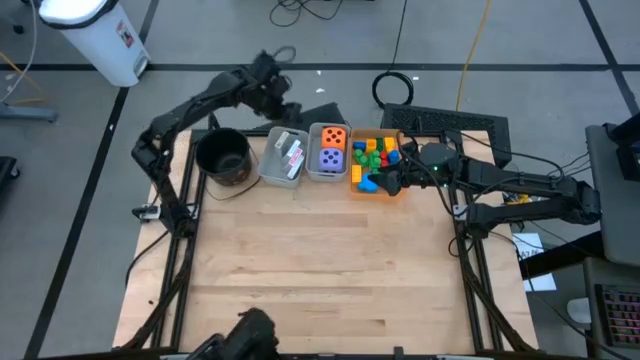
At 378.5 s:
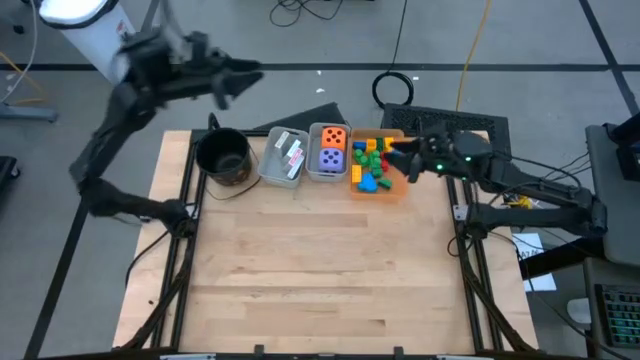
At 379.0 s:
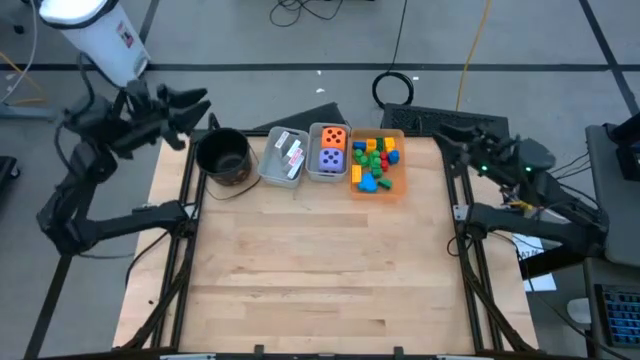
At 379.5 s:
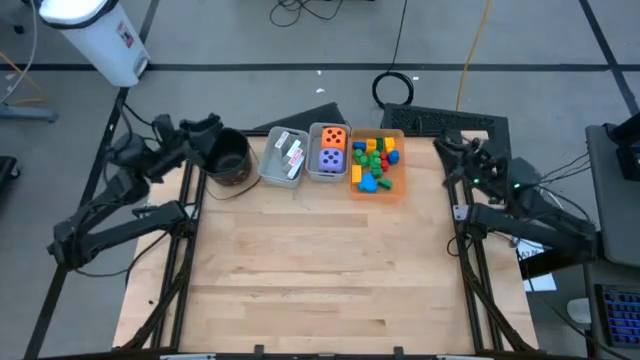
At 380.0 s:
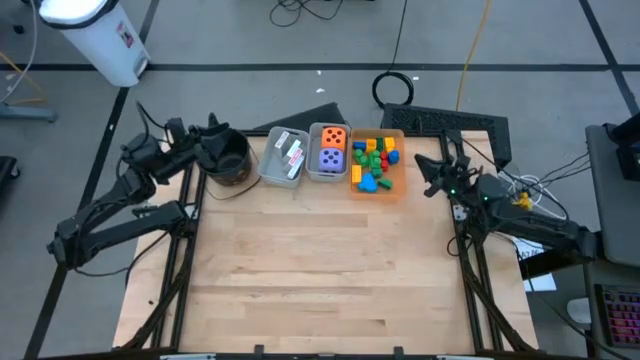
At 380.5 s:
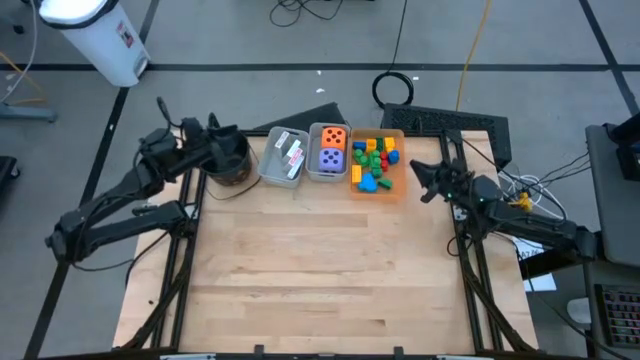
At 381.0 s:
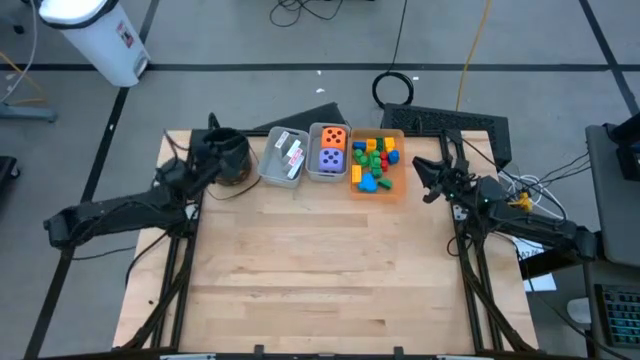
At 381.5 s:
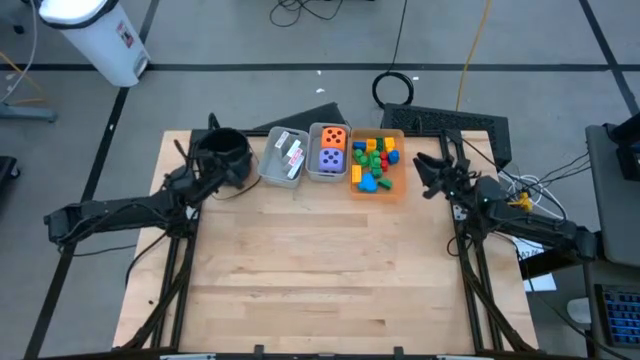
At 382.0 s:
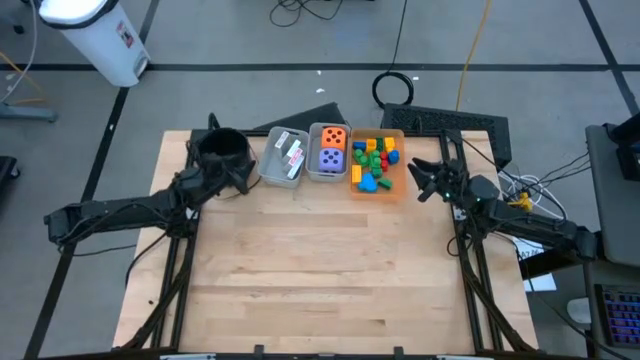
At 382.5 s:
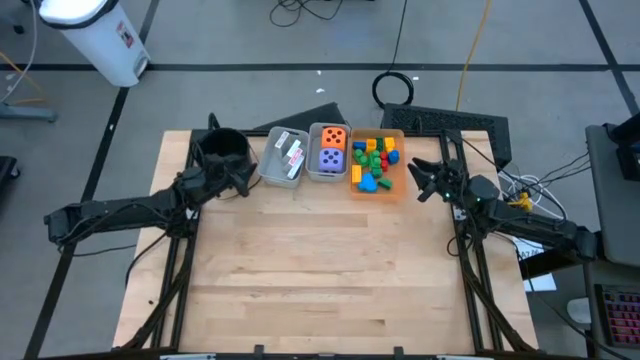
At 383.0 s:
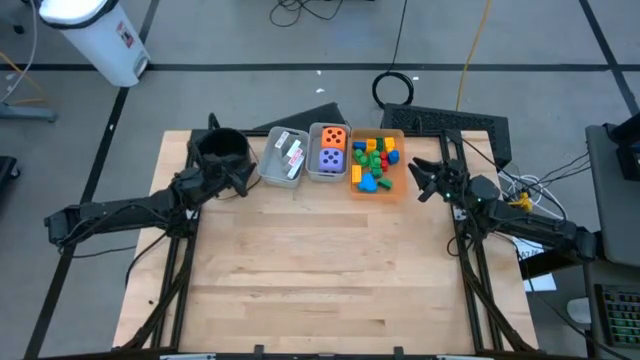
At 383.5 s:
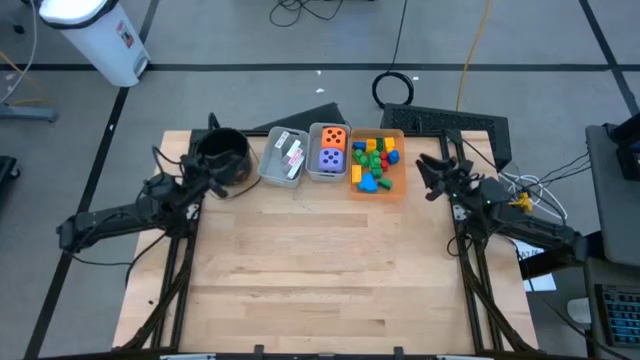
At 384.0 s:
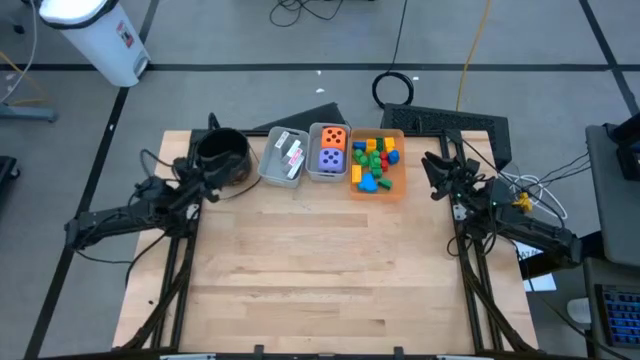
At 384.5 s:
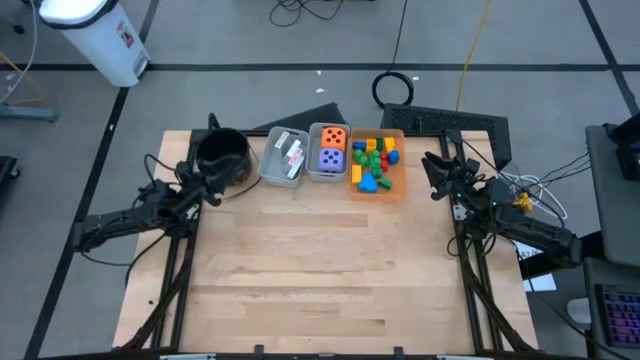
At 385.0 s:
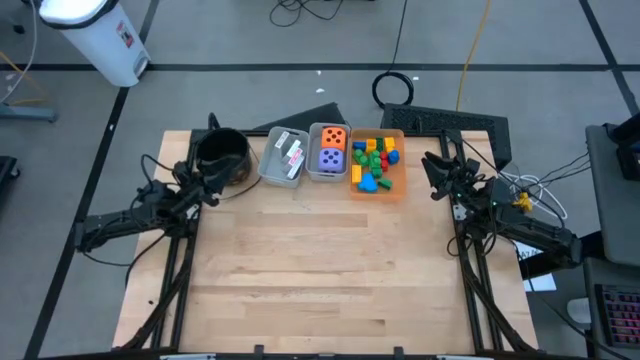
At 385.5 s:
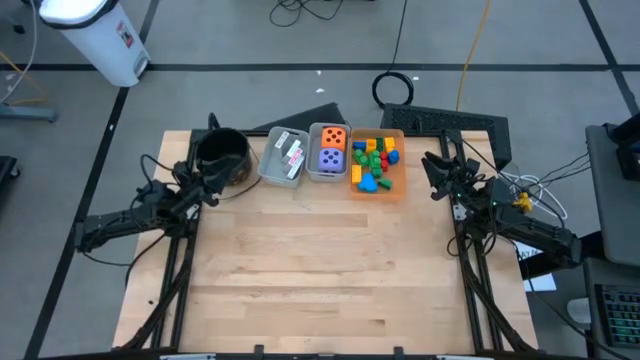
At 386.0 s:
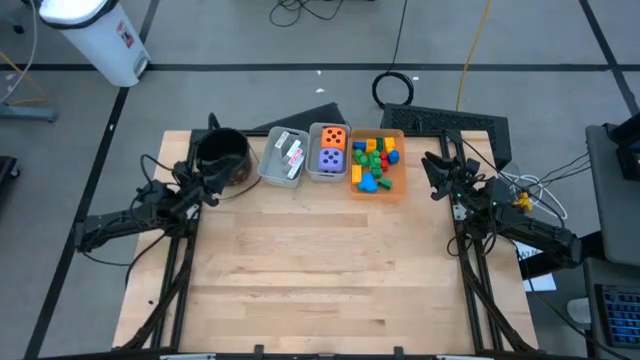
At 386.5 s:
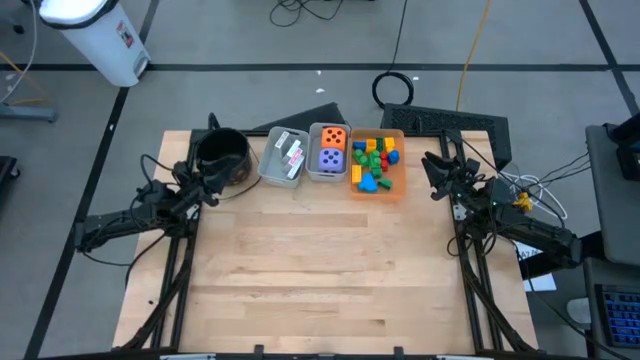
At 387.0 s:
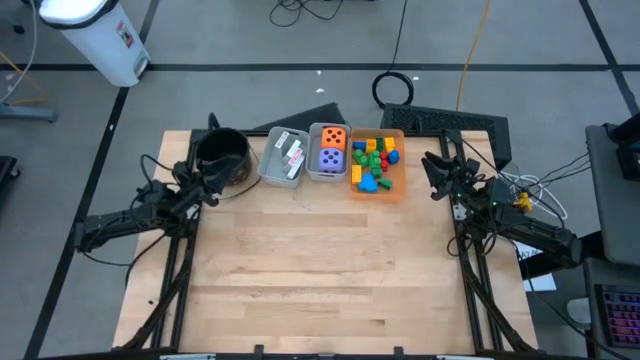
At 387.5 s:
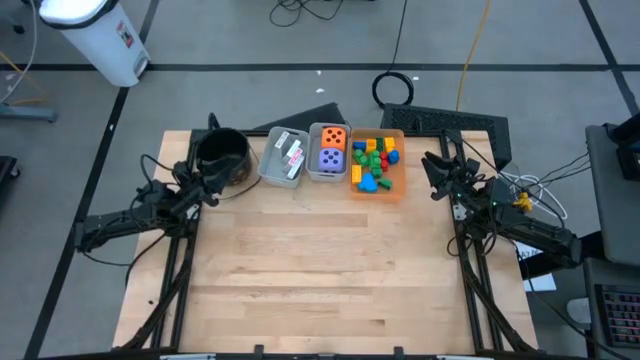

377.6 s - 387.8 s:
Task: Pick & Place Toys
Return to Home Position
